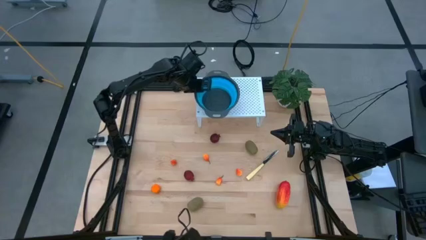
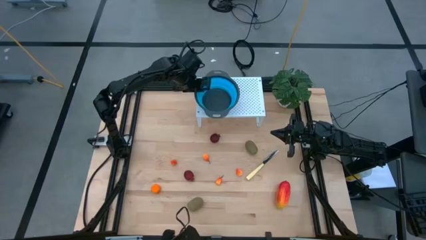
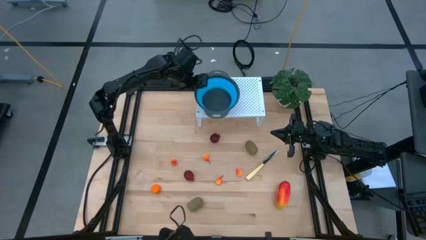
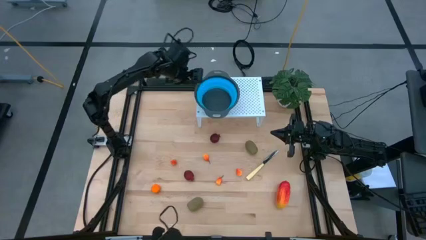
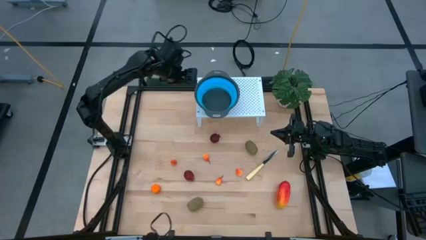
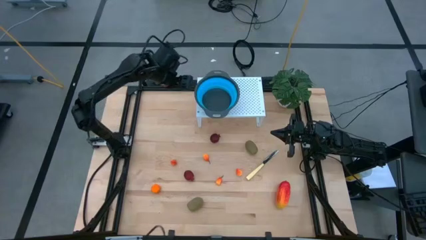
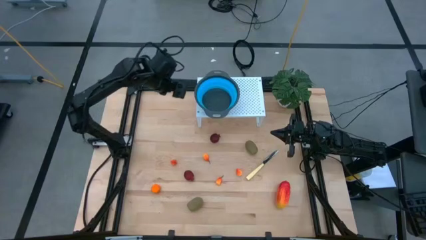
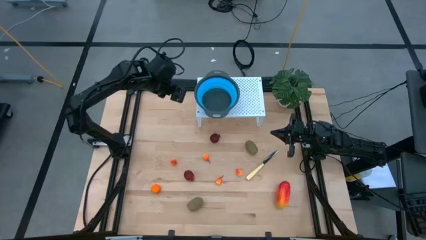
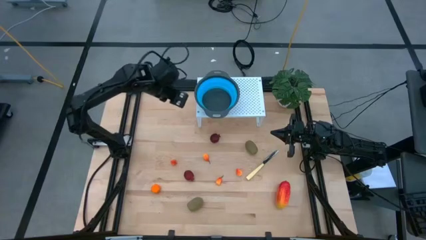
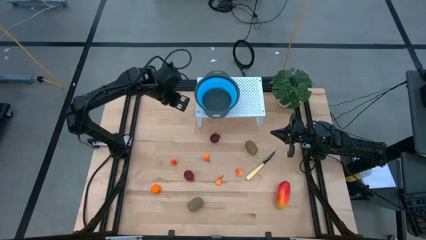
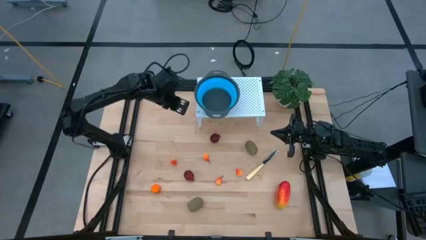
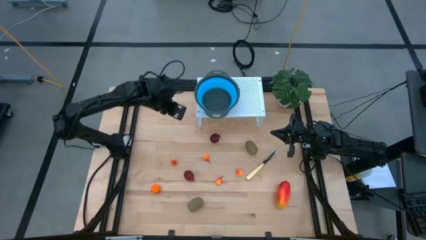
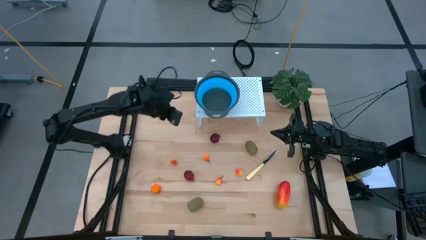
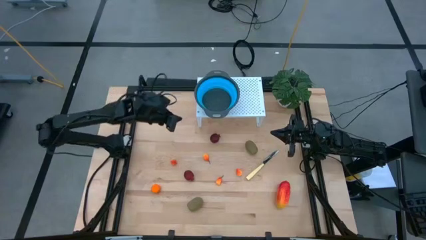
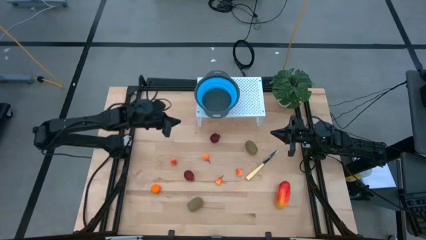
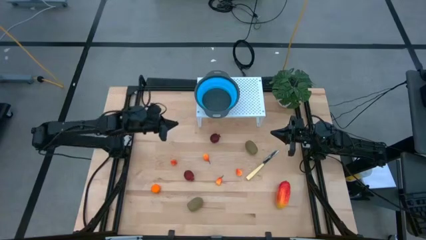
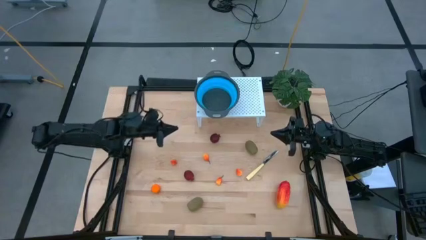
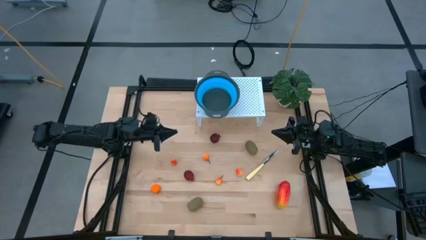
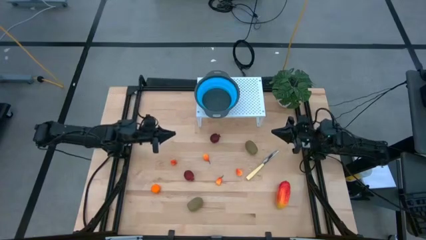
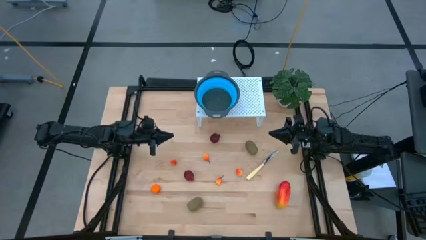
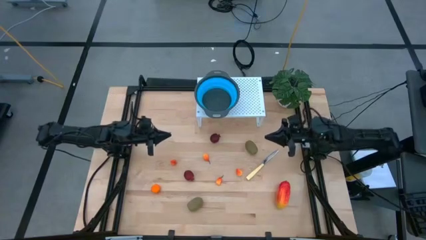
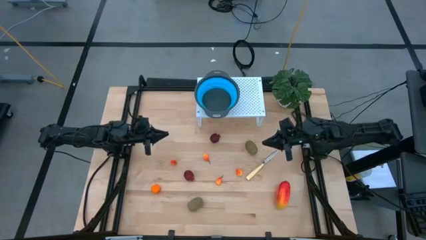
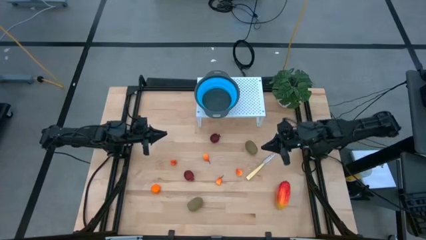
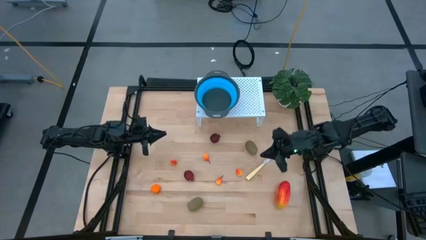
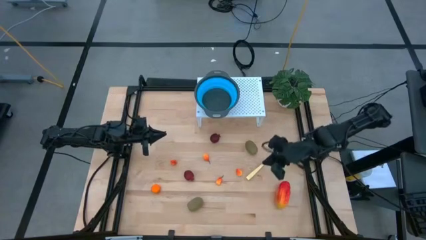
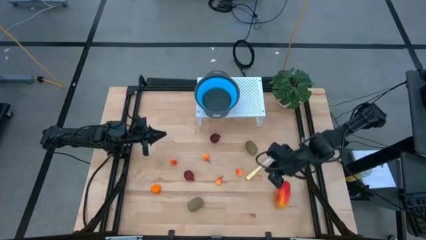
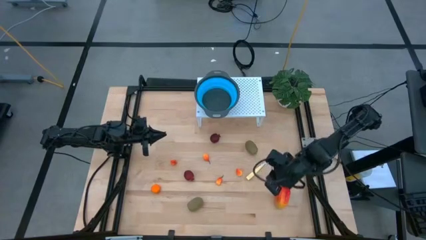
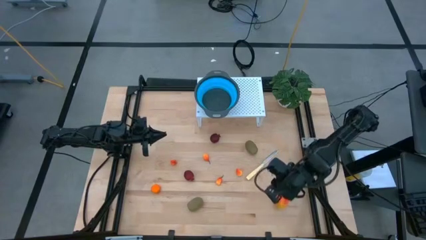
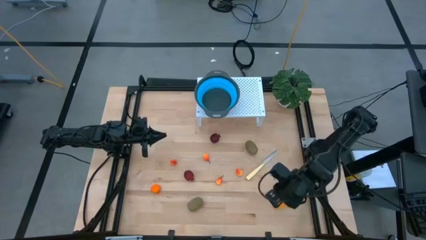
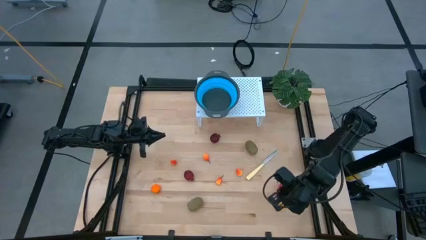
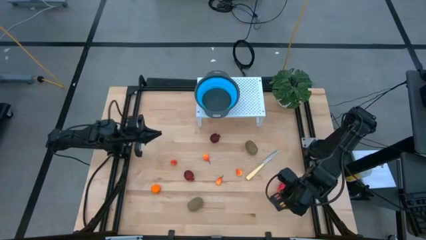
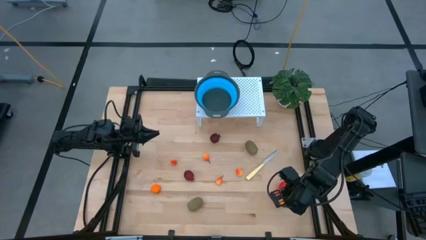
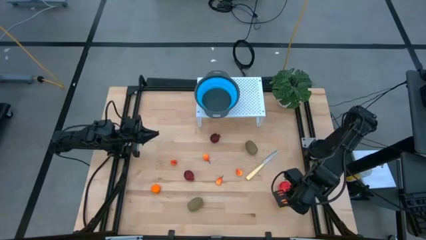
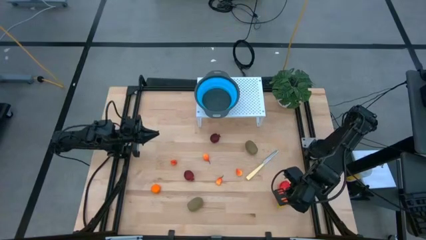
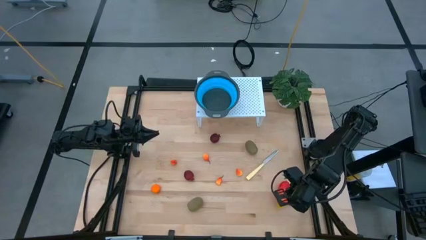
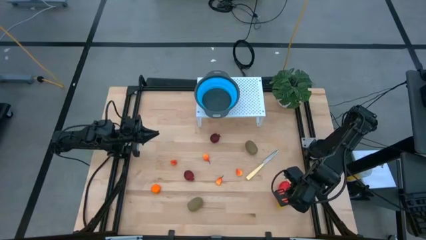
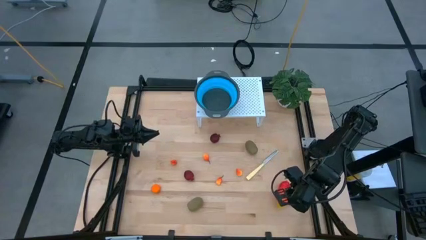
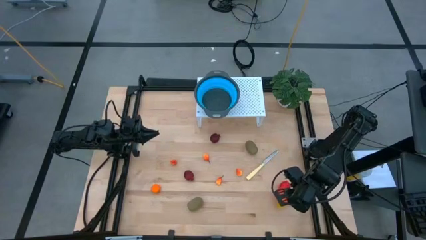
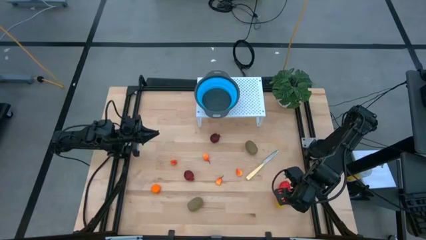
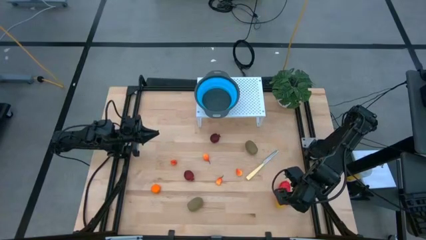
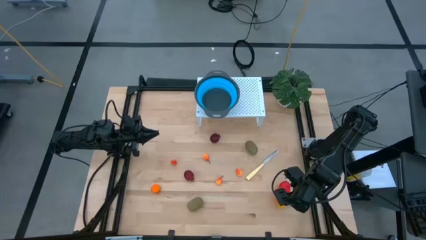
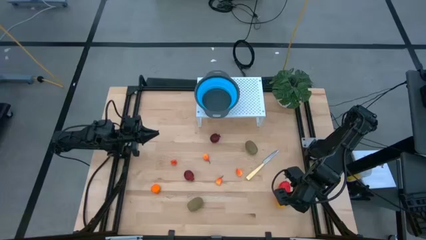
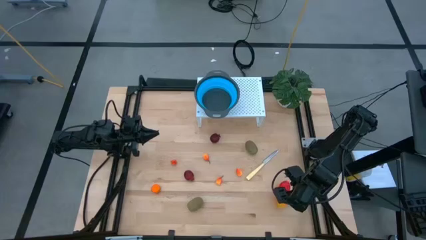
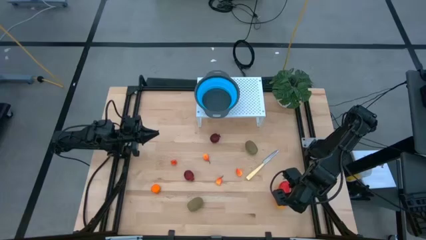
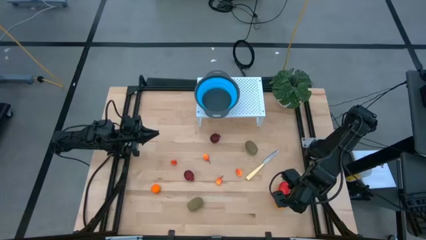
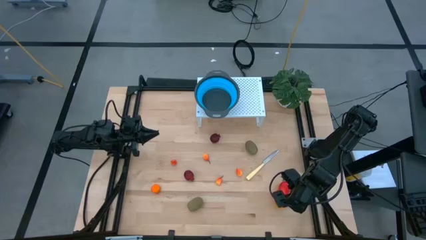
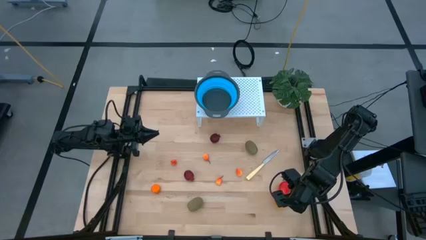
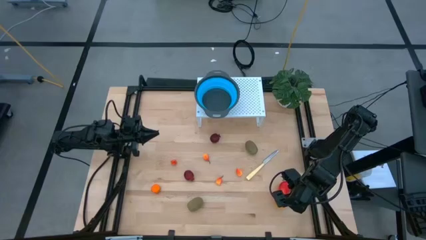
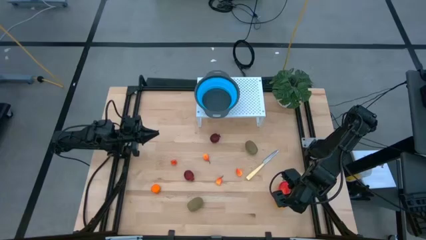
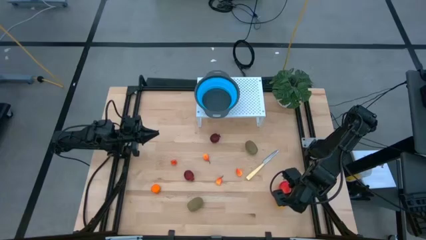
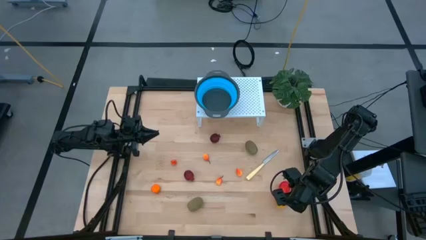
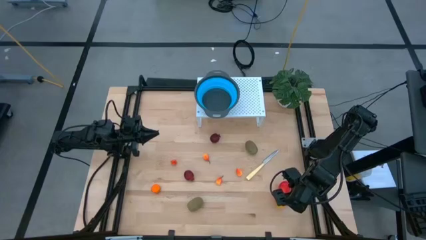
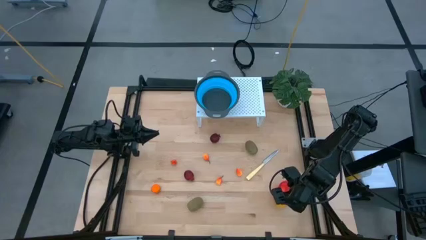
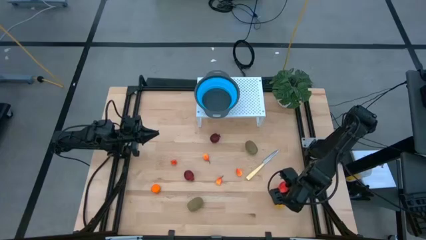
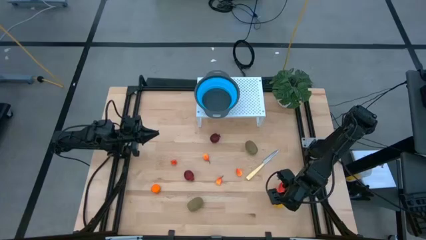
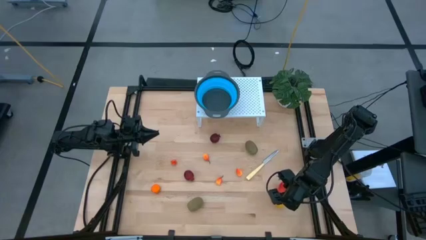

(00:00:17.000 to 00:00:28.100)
Task: Pick & Place Fruit
Put the mango into the blue strainer bowl on the shelf
